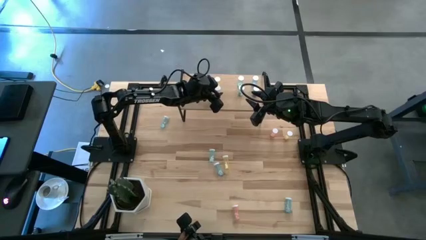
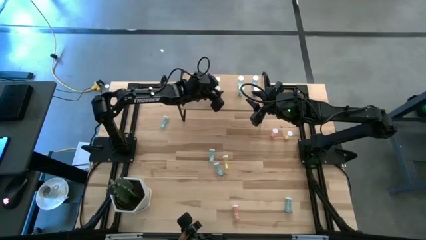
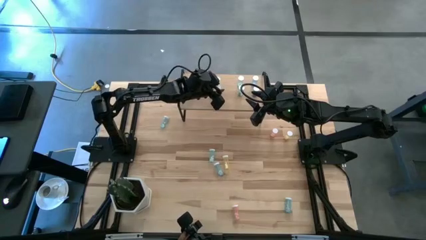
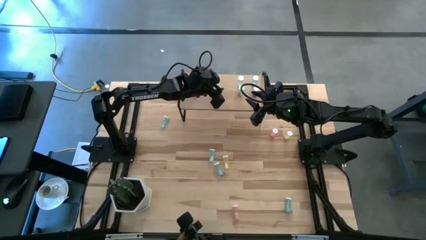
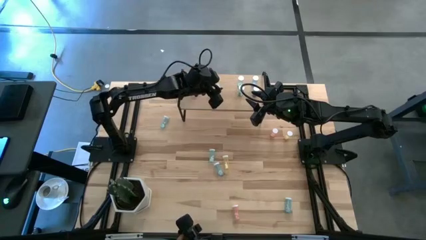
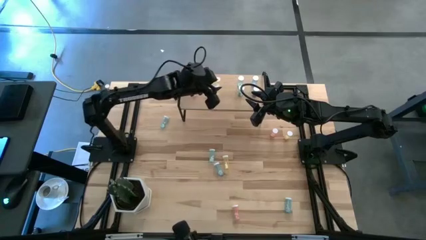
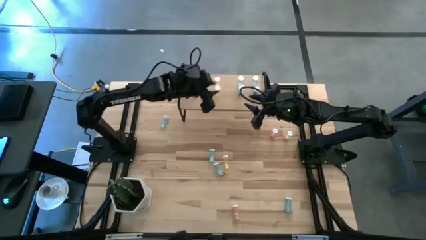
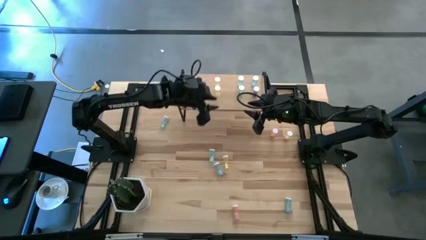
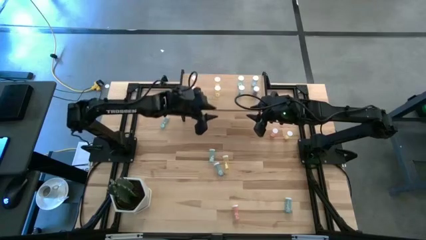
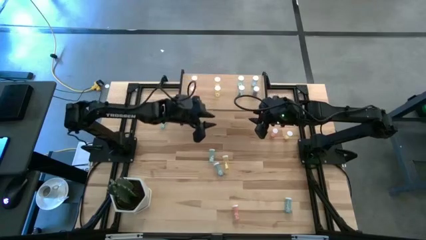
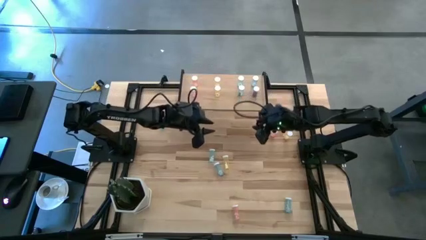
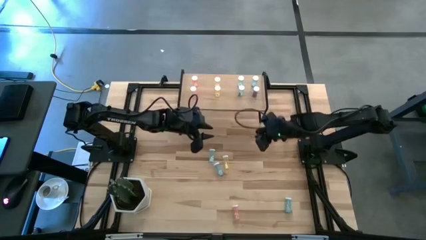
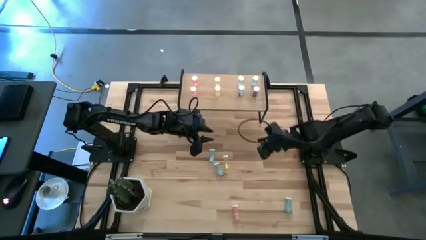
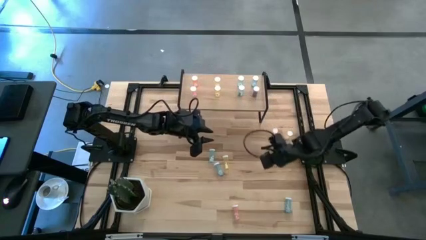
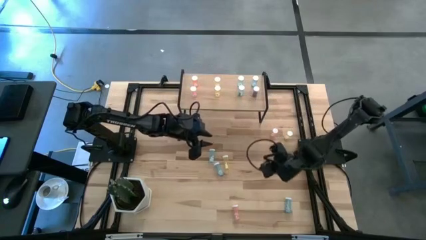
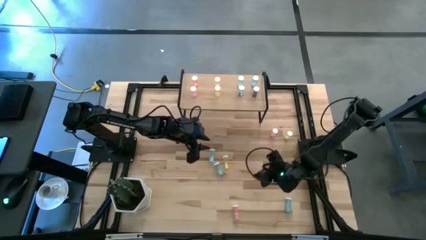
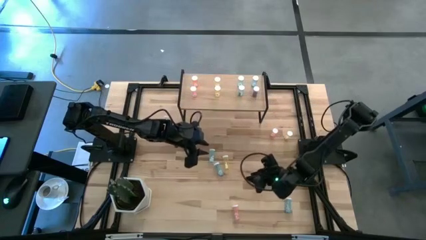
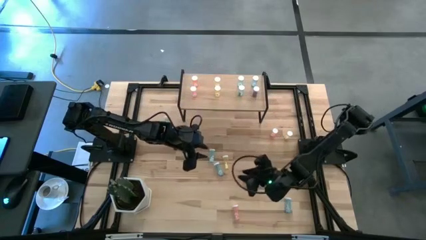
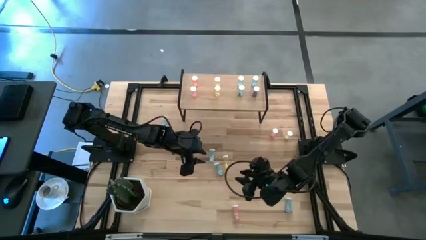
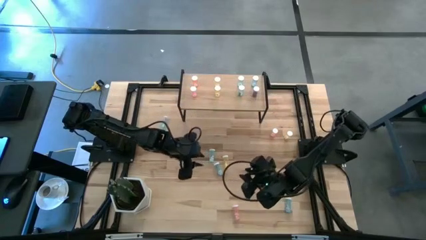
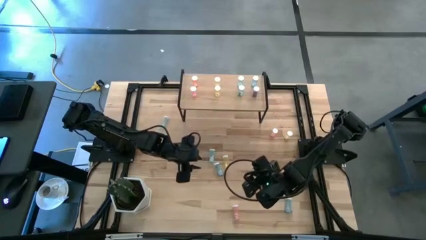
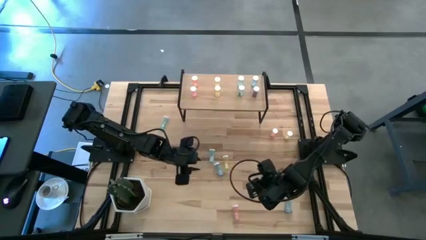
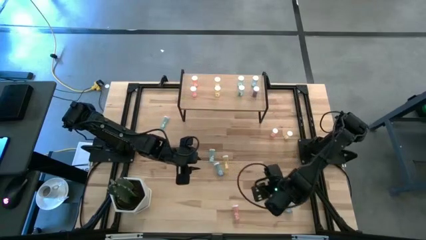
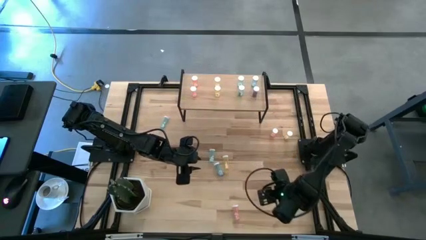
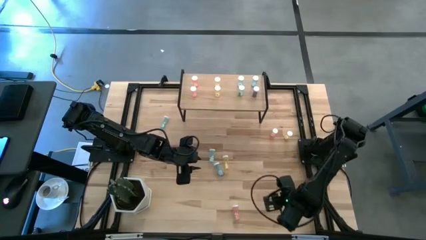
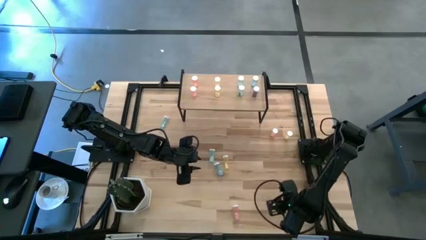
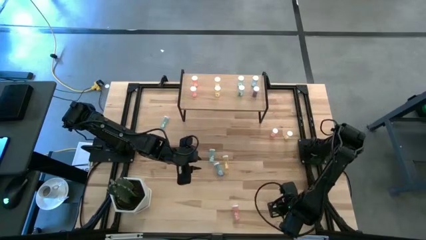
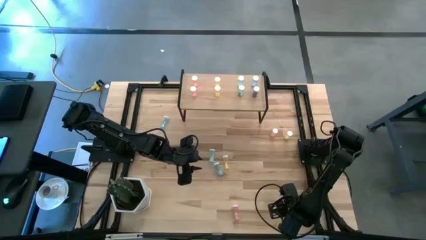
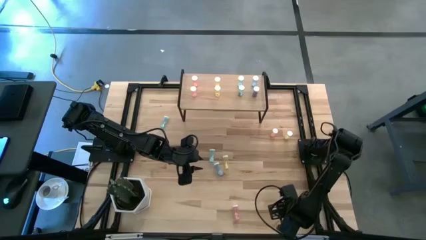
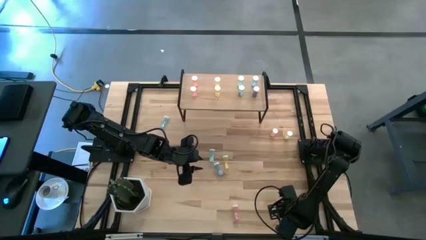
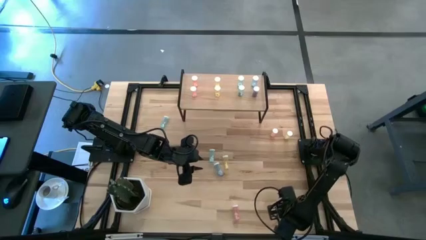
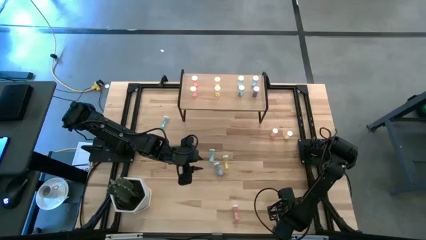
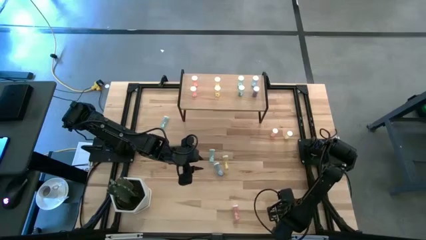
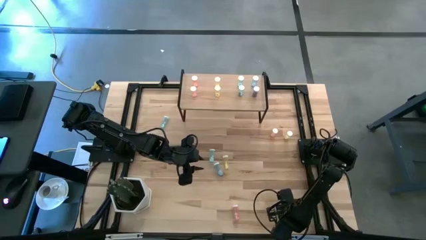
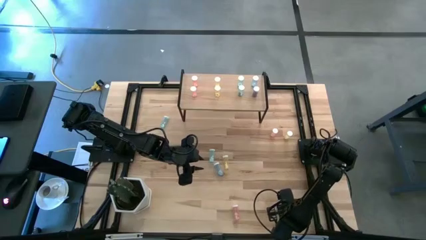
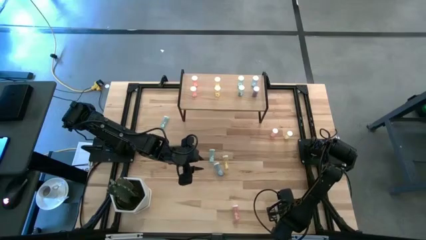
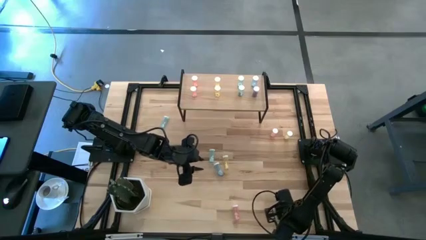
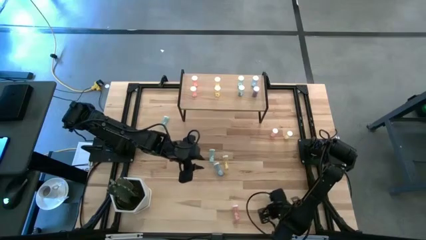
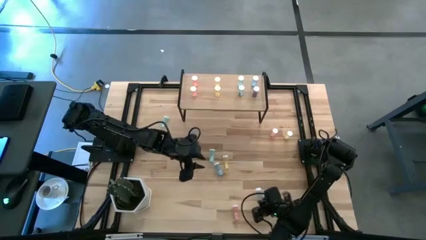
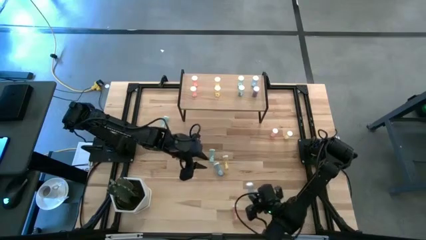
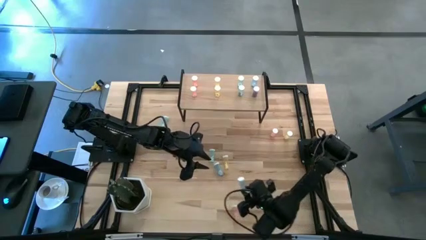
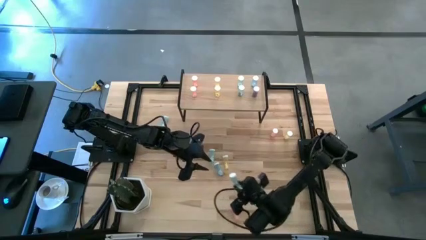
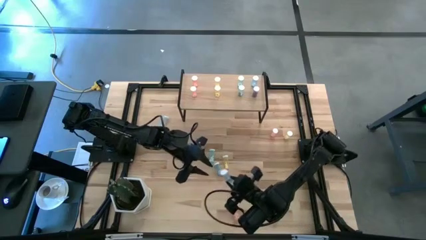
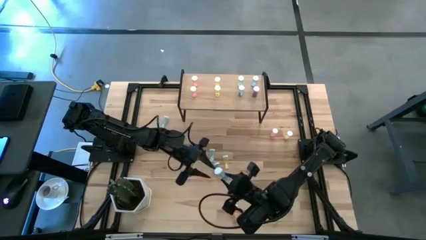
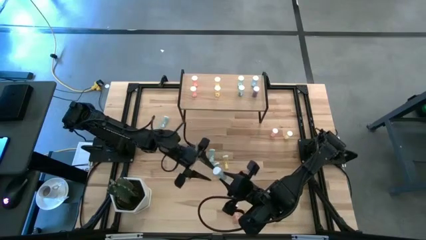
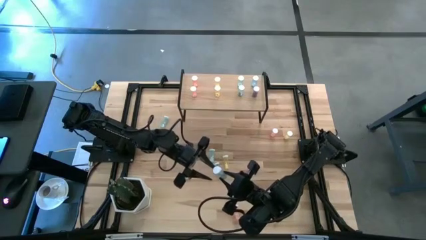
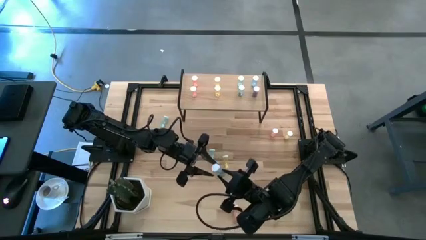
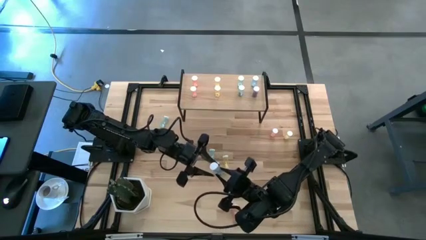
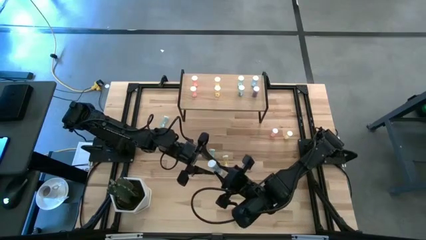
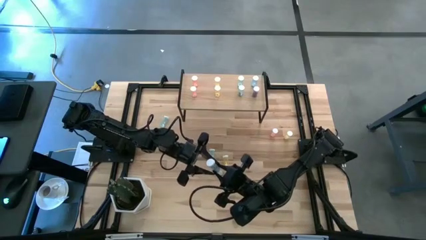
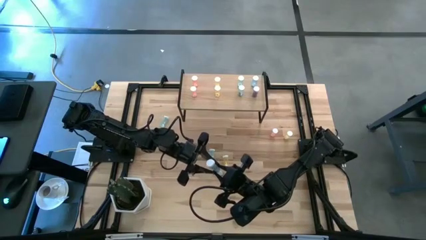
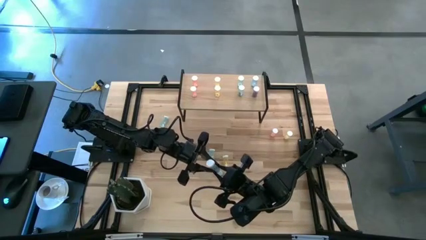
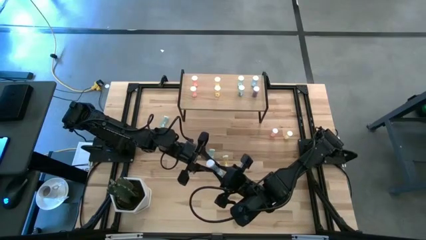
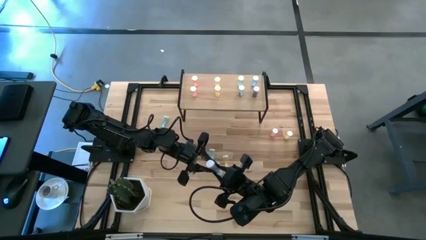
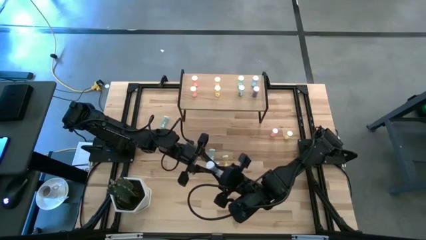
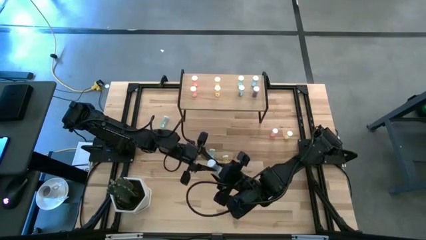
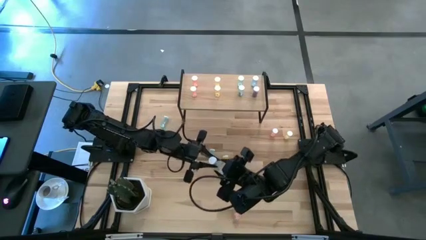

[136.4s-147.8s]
Task: Pick and place medicine bottles onto shelf by color
Put the blue pill bottle on the shelf aligned with the other blue pill bottles
